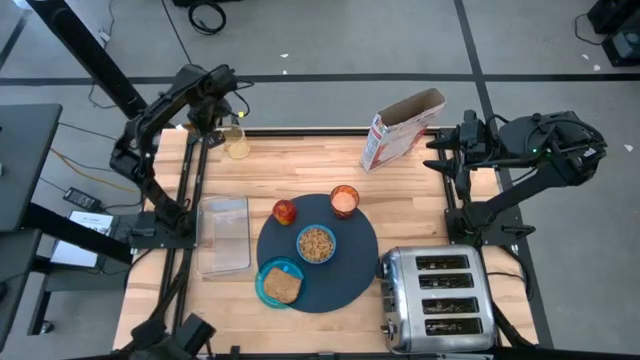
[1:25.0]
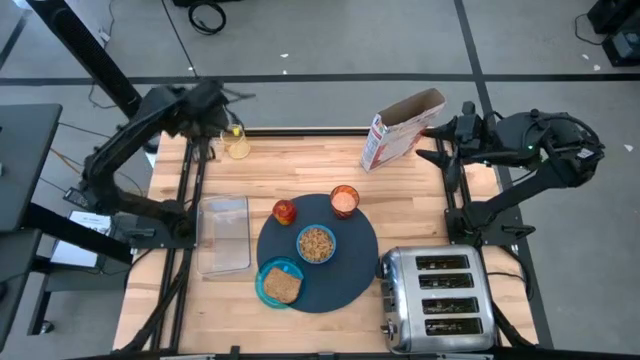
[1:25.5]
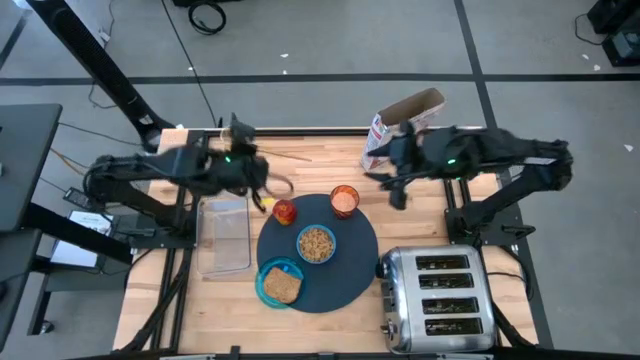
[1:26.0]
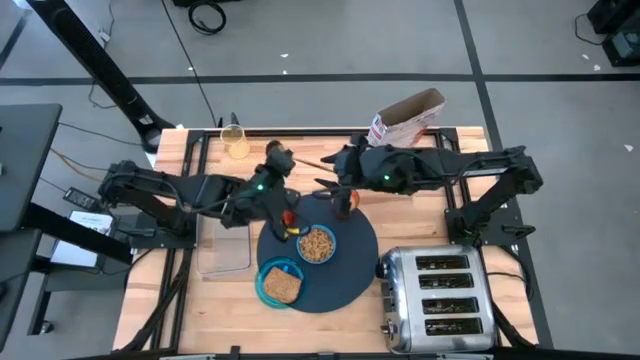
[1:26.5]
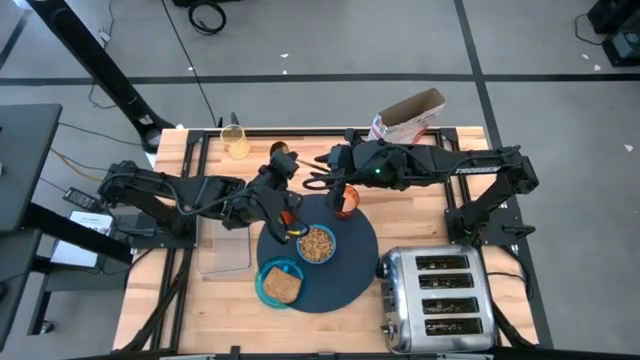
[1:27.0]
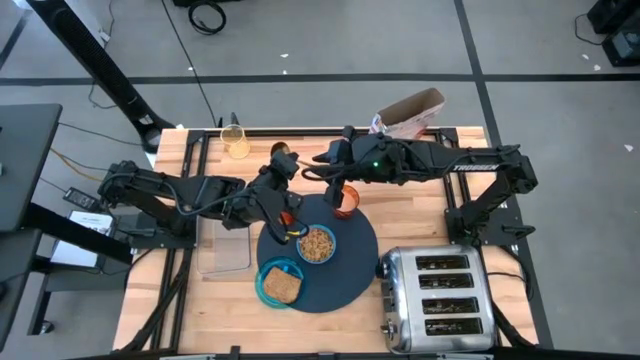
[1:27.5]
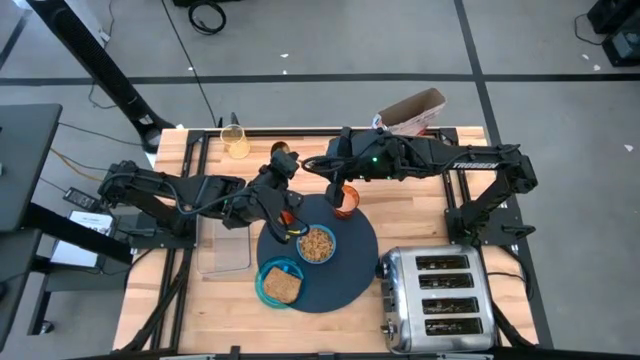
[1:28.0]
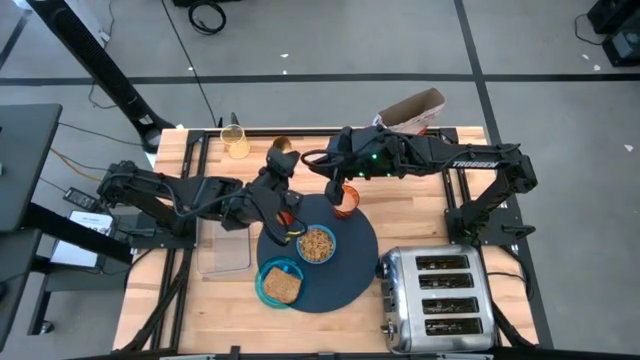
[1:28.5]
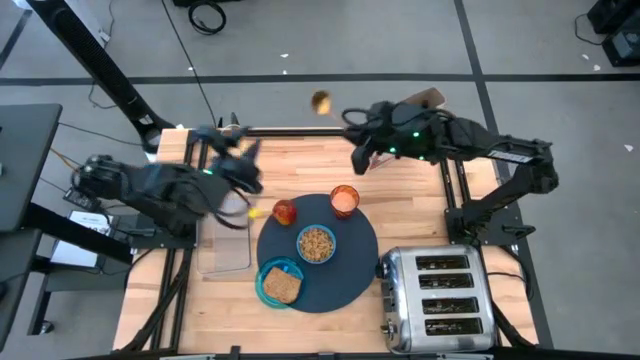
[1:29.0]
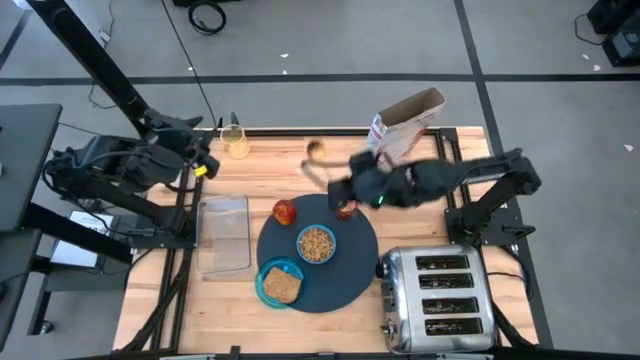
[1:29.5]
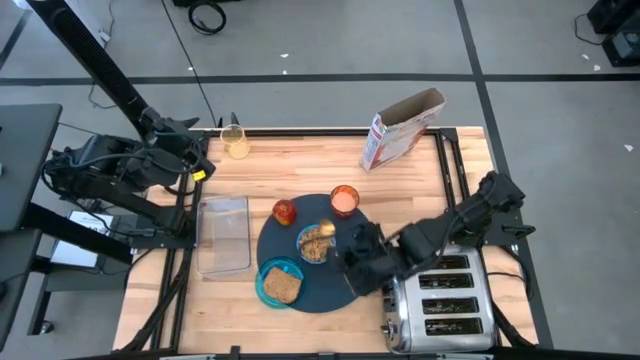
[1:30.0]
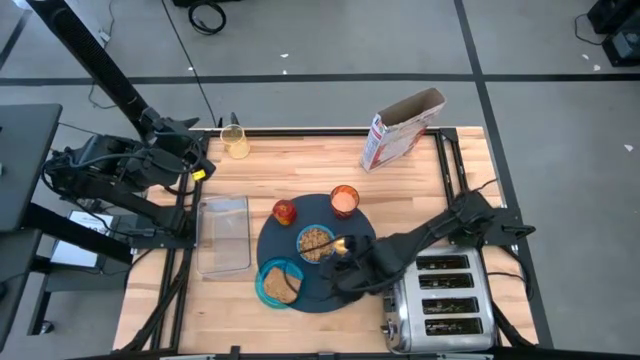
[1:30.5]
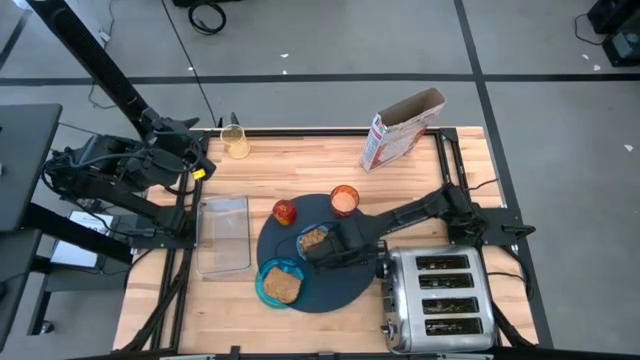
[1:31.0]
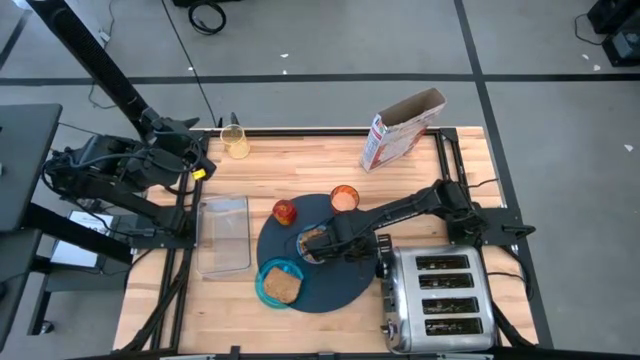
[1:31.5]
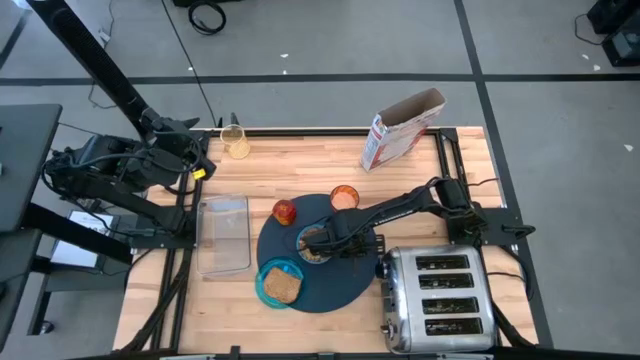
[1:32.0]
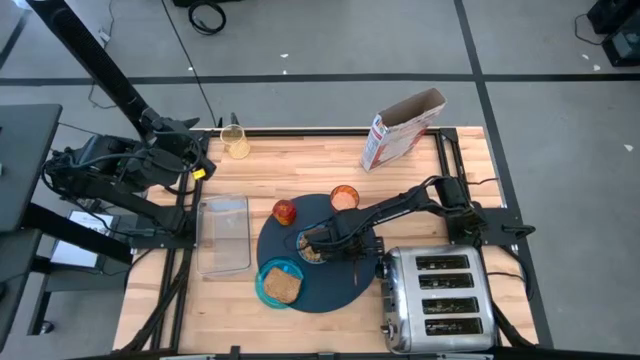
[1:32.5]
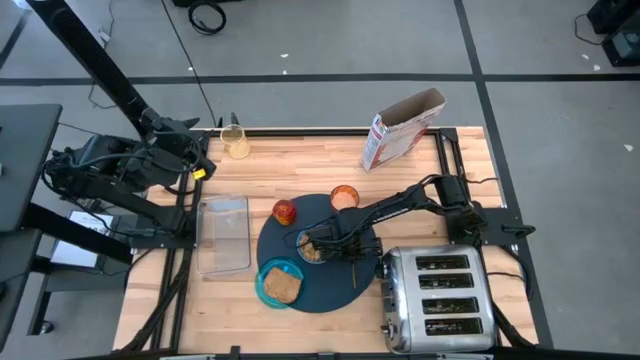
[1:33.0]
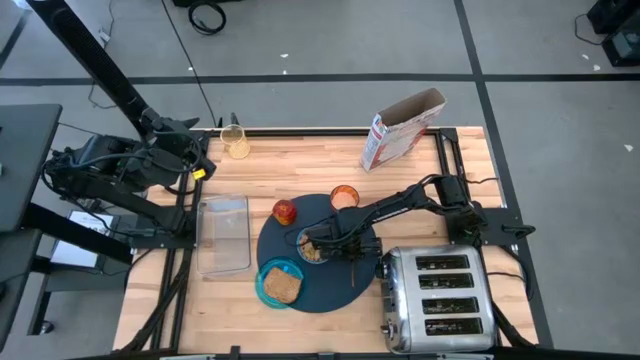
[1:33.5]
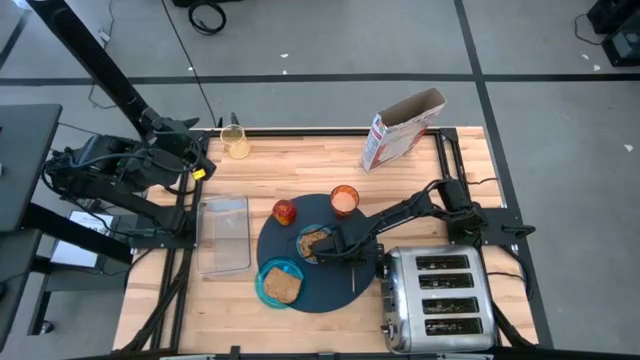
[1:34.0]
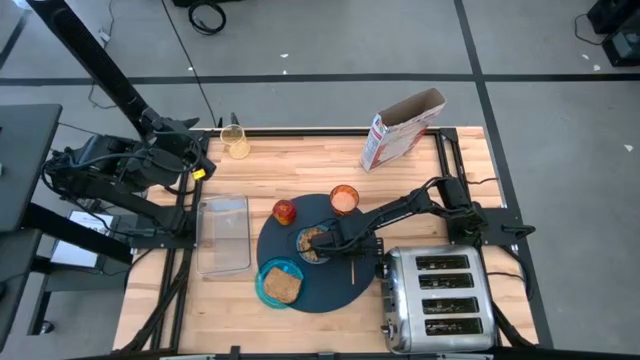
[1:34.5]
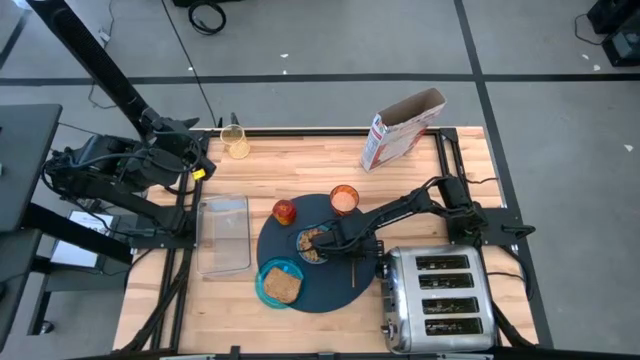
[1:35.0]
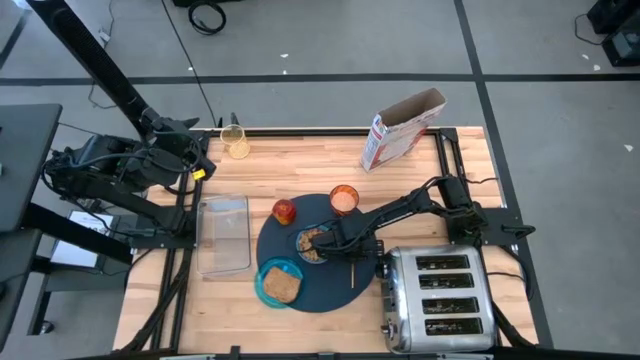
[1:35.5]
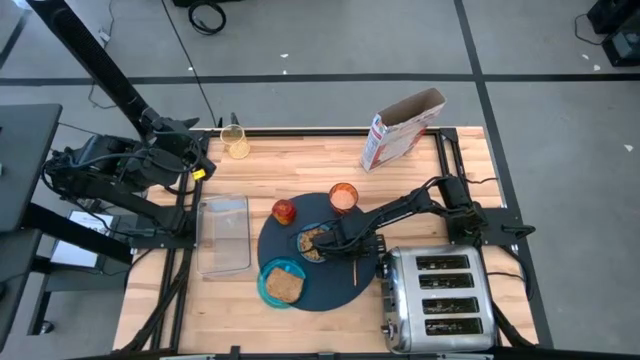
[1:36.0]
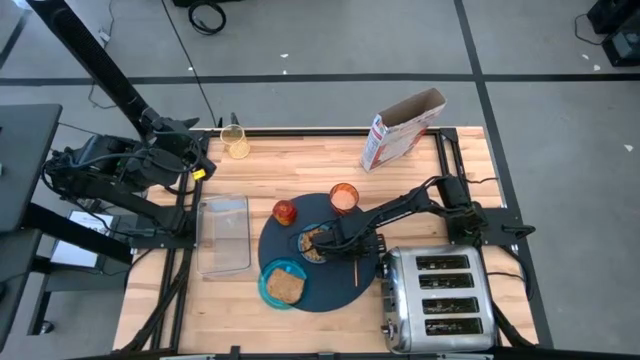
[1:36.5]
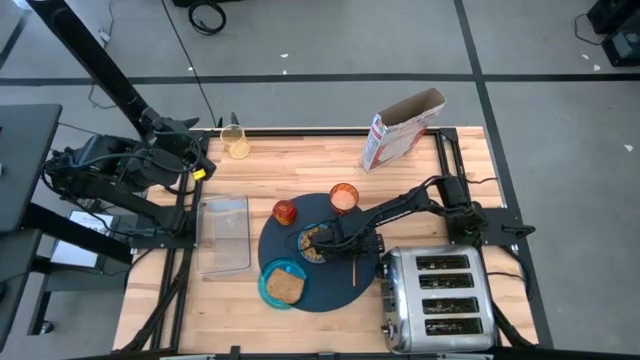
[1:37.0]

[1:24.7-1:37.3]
Task: Arrange a breakfast setting
Put the gold spoon on top of the dark blue placemat beside the blue bowl

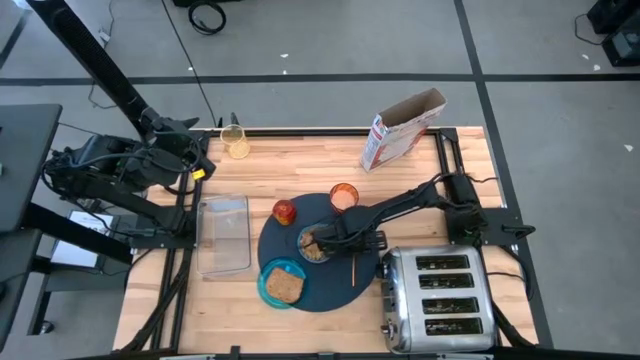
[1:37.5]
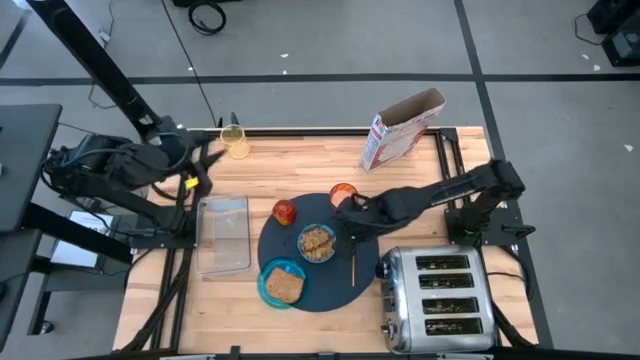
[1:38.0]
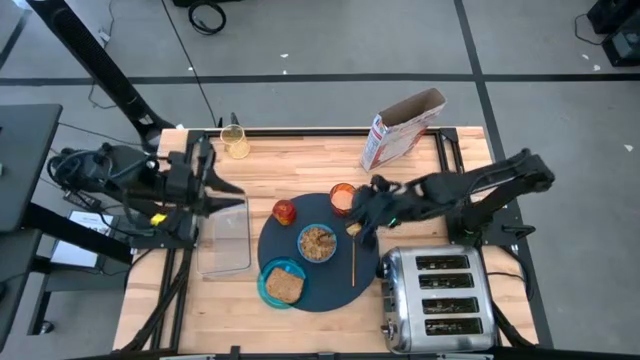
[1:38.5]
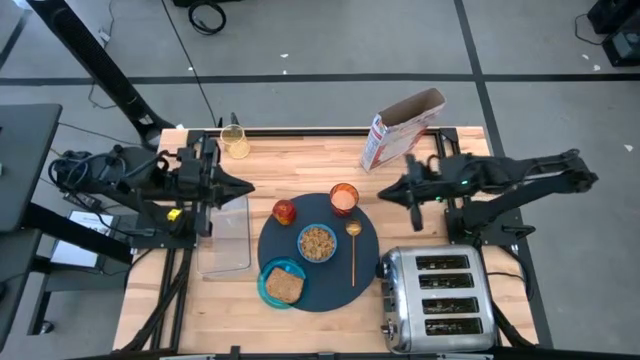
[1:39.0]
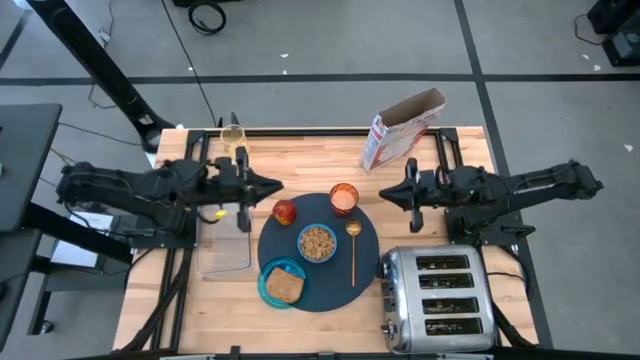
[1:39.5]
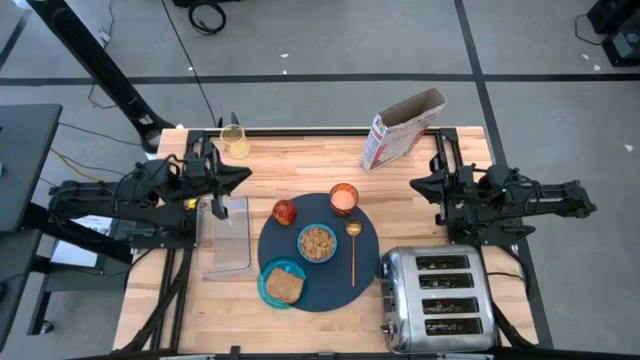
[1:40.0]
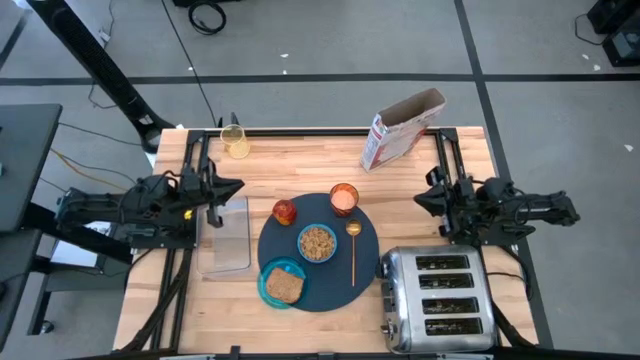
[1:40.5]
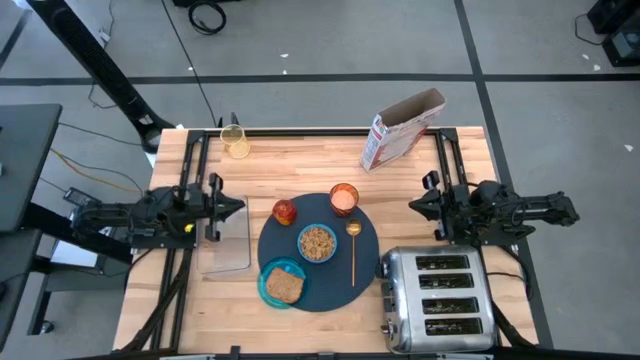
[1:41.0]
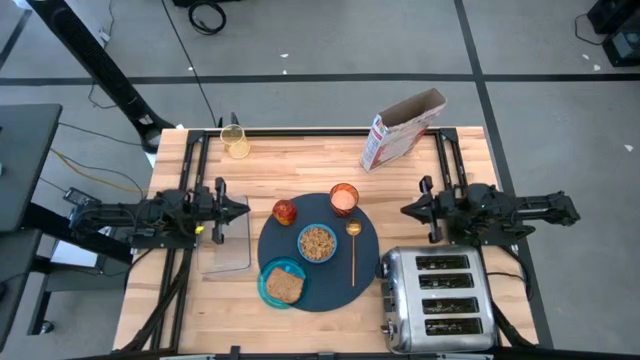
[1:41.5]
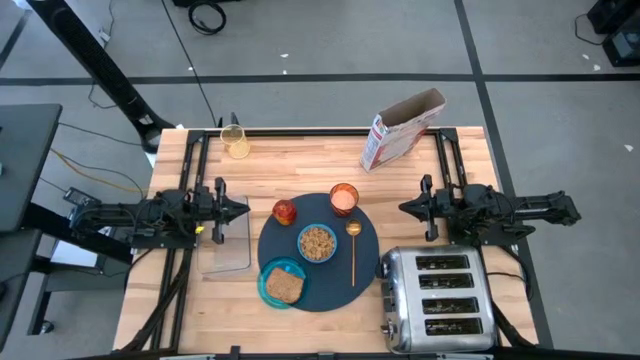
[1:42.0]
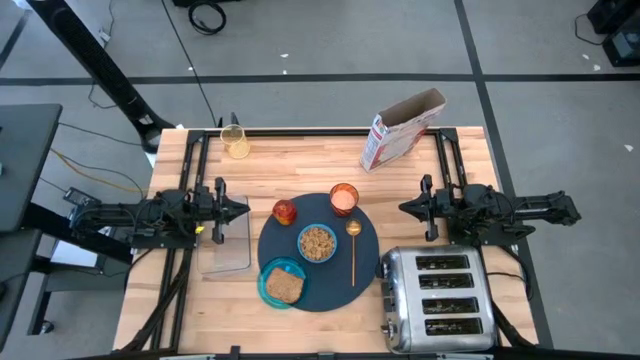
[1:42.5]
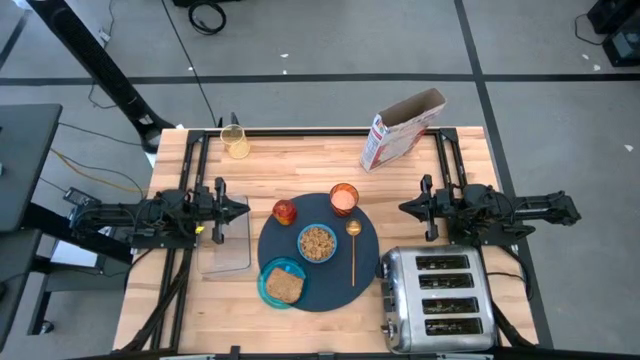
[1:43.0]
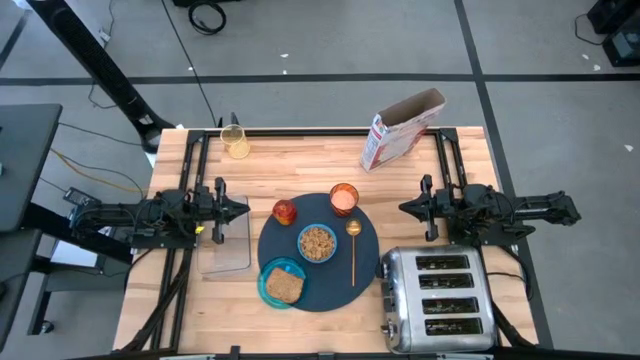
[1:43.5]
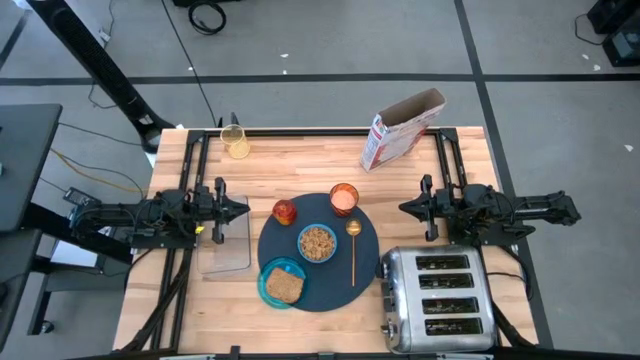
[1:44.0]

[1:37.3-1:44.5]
Return to Home Position

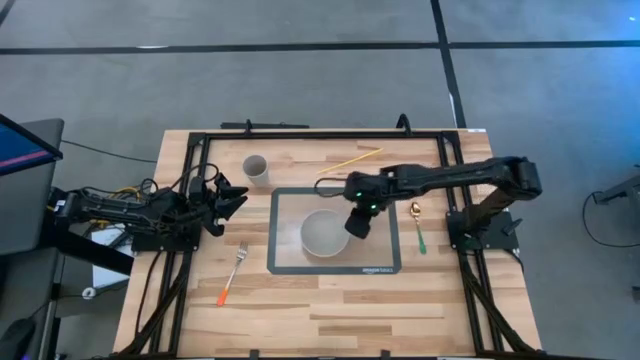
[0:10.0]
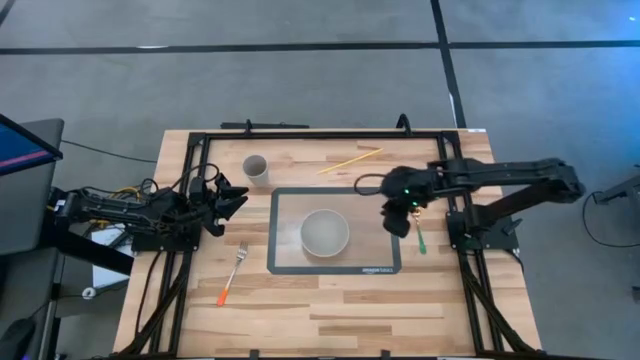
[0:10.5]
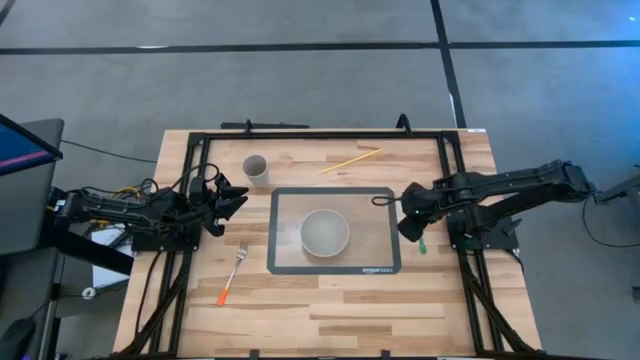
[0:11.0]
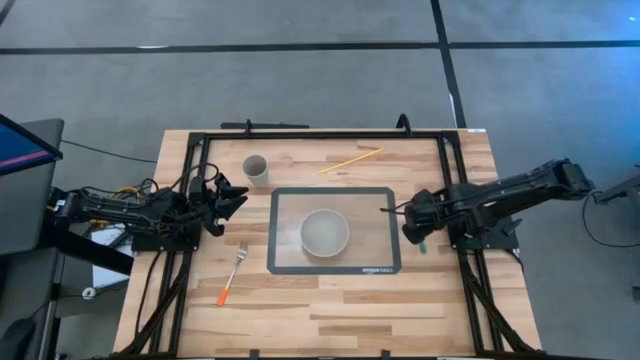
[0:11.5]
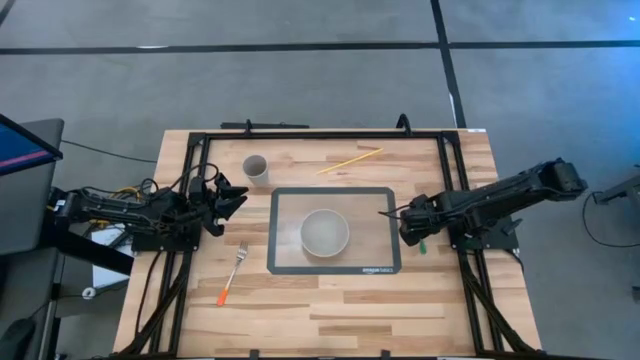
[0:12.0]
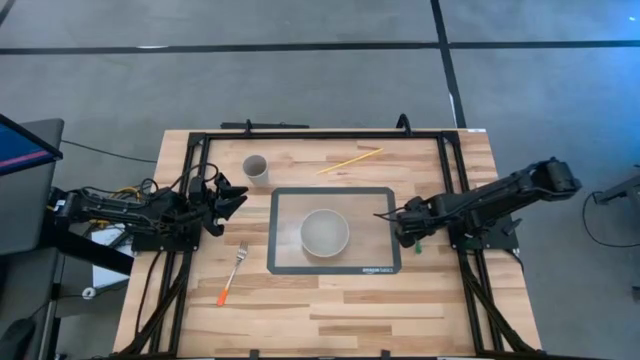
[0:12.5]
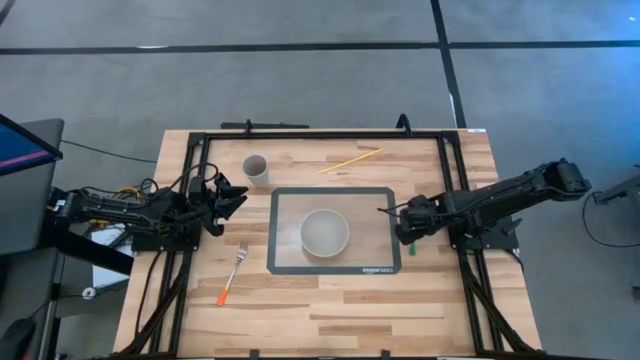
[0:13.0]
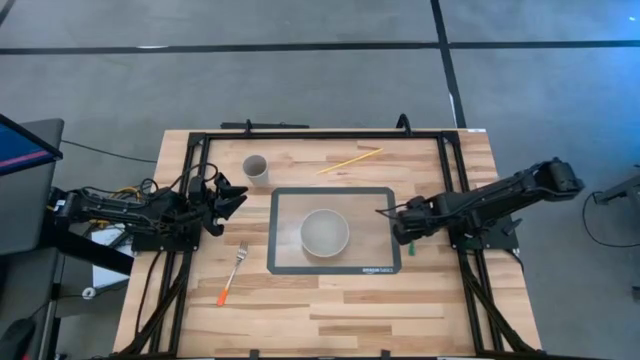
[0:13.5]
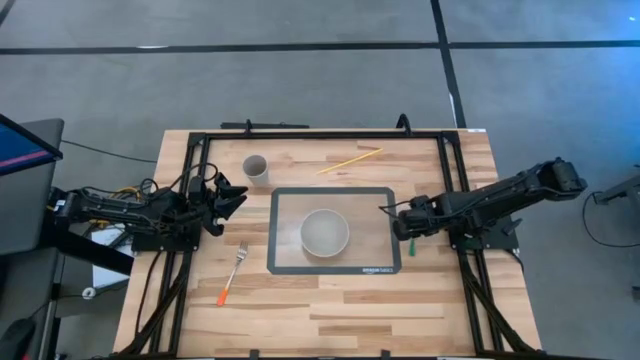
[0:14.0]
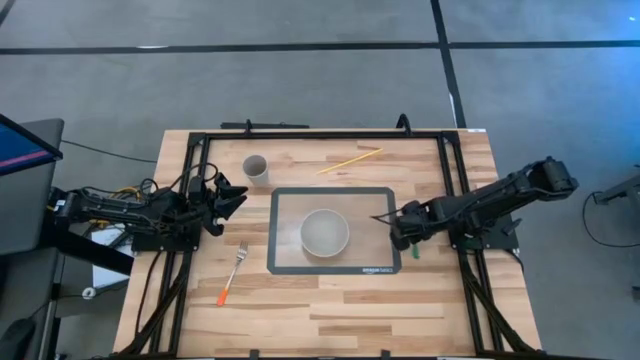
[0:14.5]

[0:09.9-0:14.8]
Task: Pick & Place Utensil
Put the green spoon into the white bowl
